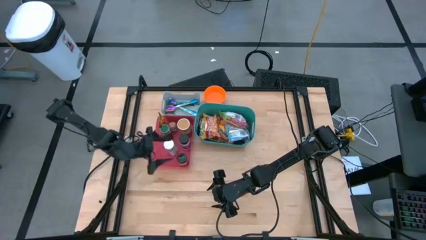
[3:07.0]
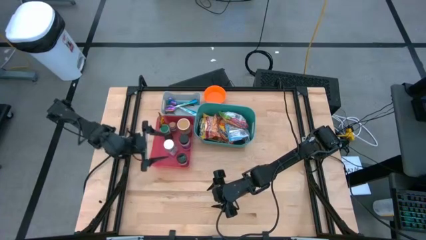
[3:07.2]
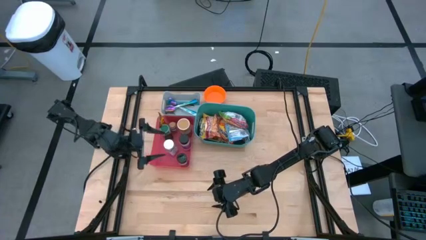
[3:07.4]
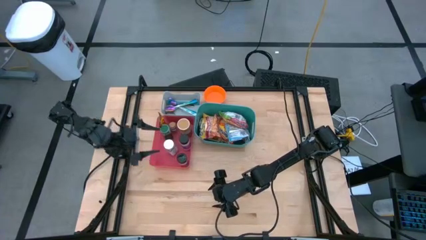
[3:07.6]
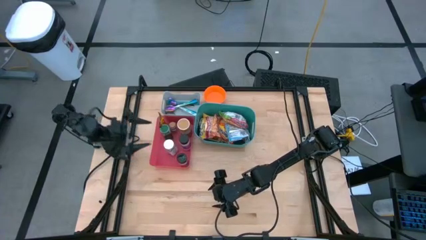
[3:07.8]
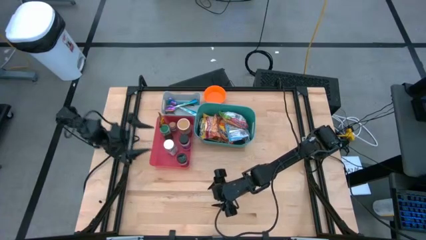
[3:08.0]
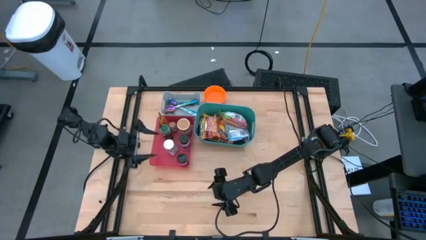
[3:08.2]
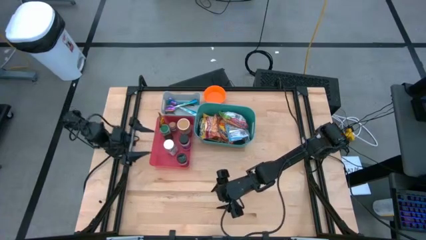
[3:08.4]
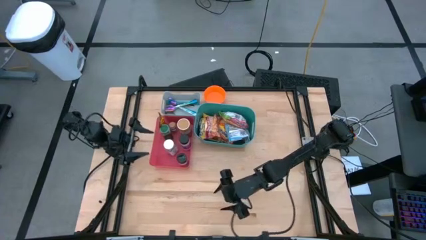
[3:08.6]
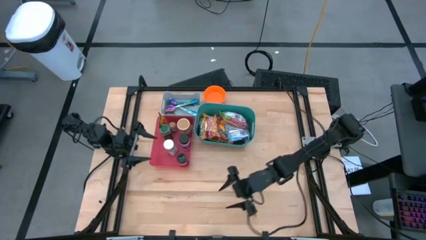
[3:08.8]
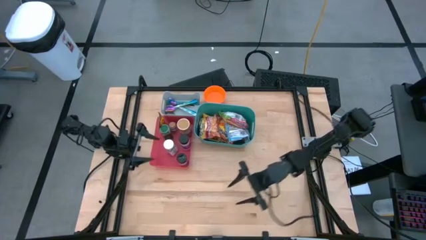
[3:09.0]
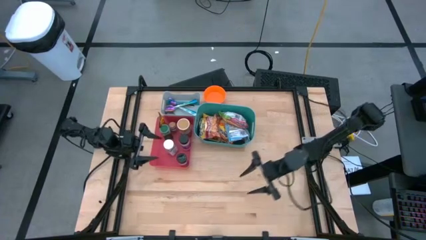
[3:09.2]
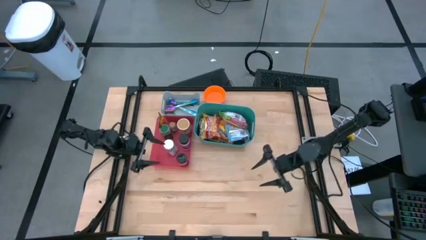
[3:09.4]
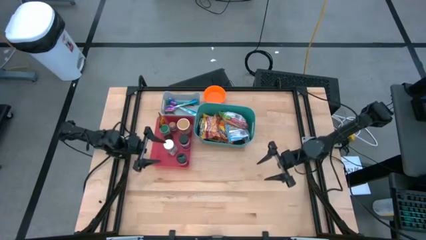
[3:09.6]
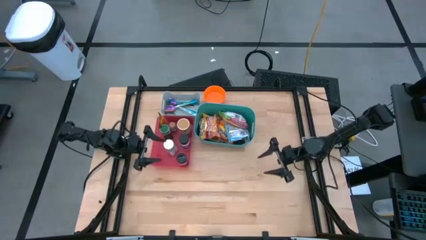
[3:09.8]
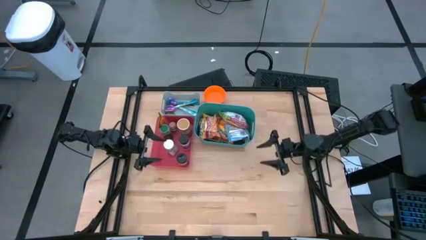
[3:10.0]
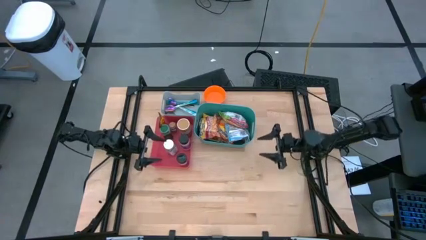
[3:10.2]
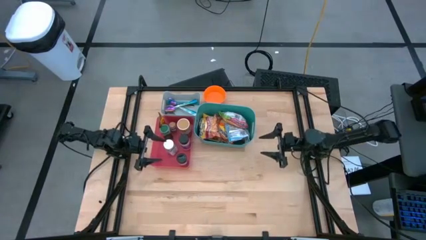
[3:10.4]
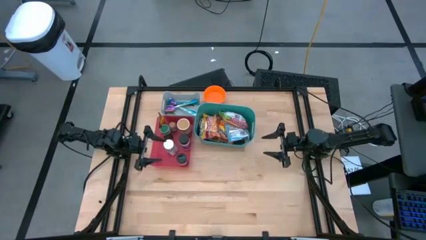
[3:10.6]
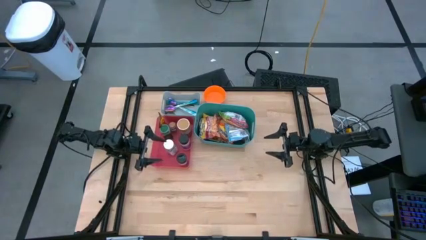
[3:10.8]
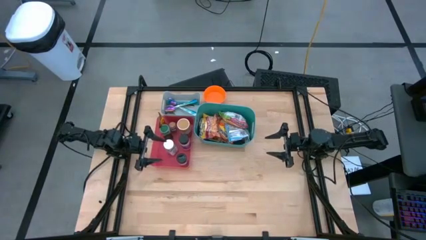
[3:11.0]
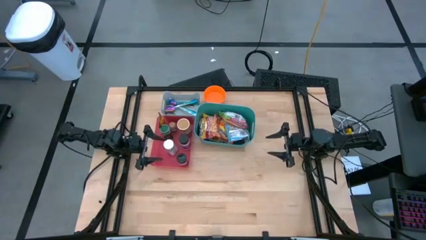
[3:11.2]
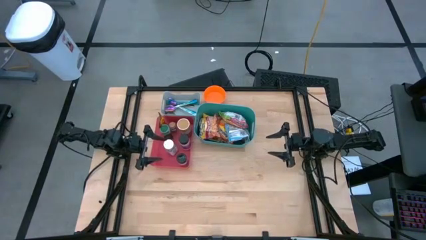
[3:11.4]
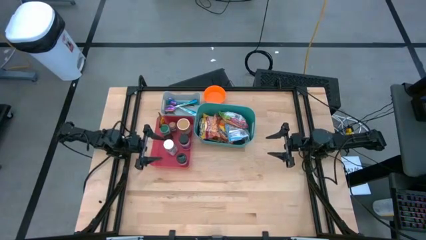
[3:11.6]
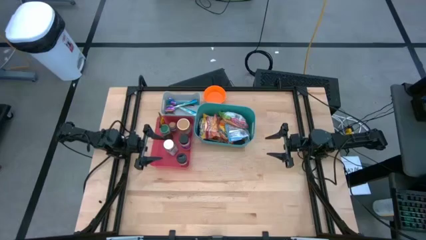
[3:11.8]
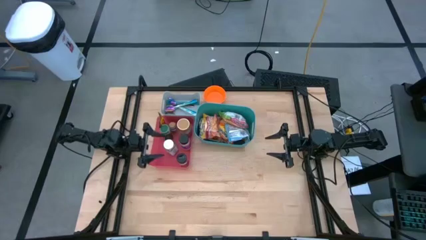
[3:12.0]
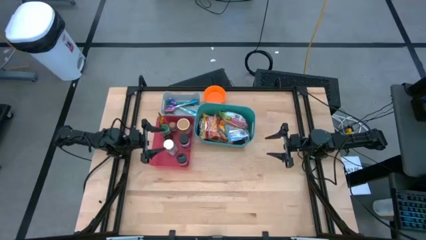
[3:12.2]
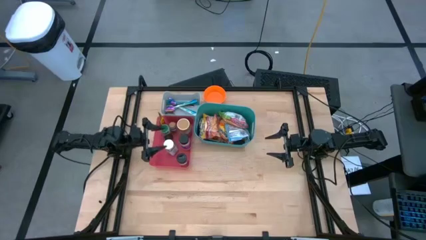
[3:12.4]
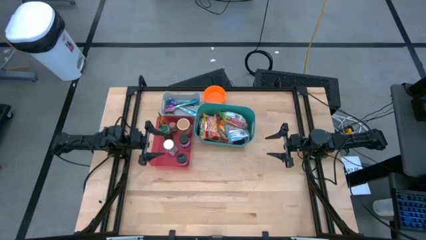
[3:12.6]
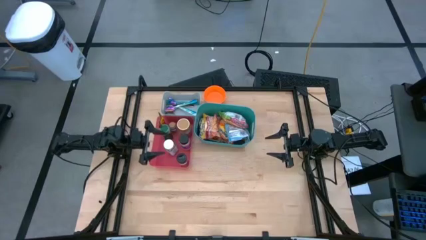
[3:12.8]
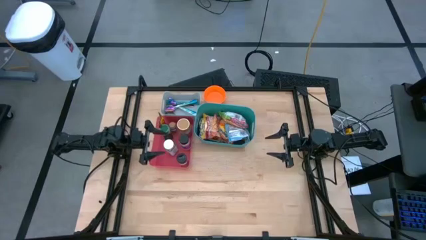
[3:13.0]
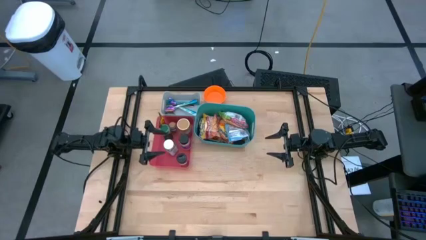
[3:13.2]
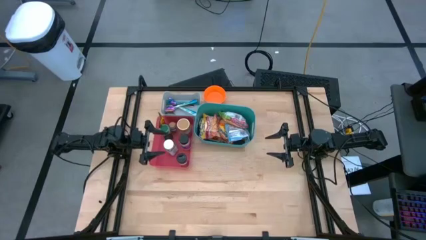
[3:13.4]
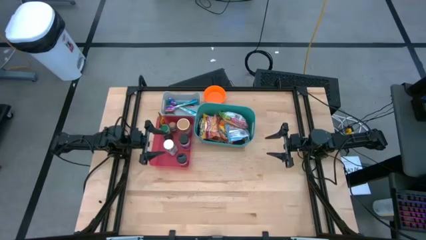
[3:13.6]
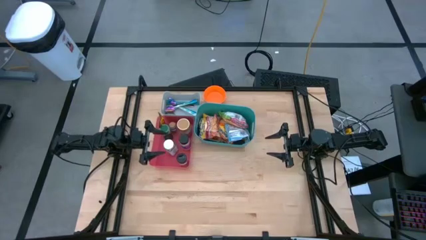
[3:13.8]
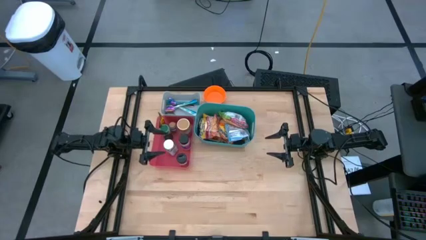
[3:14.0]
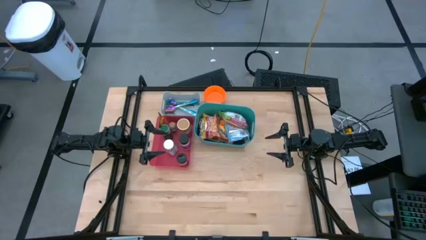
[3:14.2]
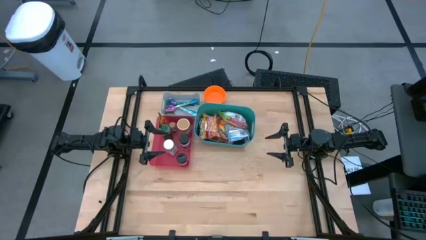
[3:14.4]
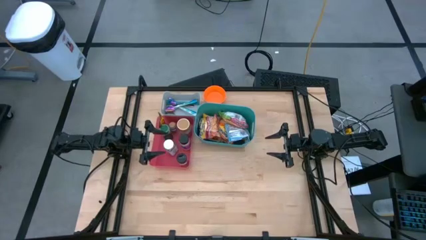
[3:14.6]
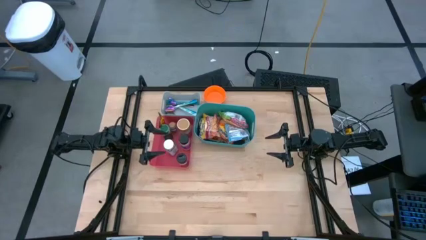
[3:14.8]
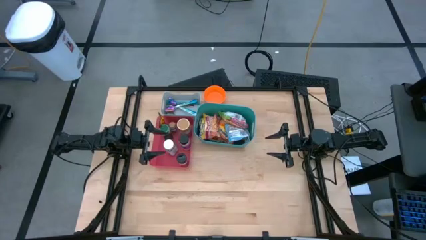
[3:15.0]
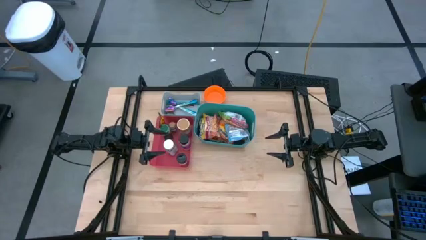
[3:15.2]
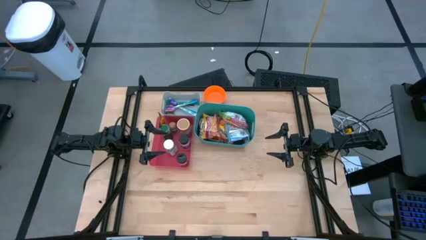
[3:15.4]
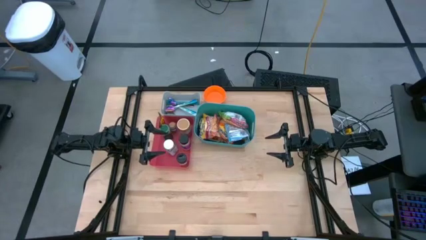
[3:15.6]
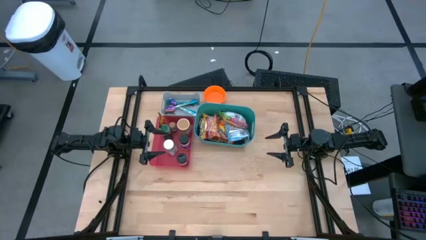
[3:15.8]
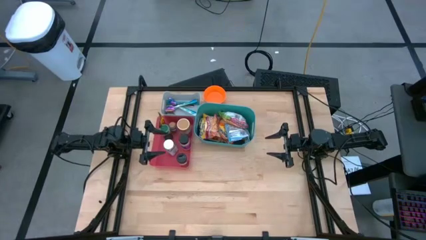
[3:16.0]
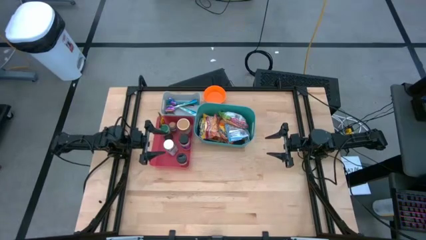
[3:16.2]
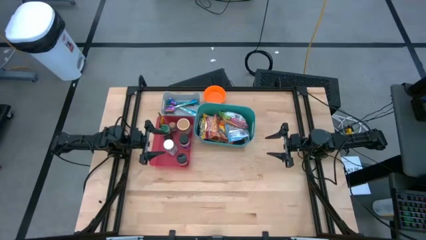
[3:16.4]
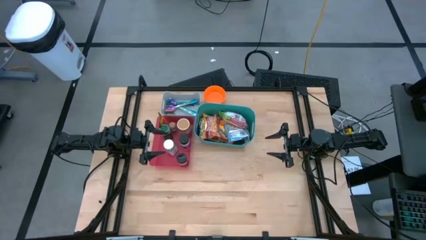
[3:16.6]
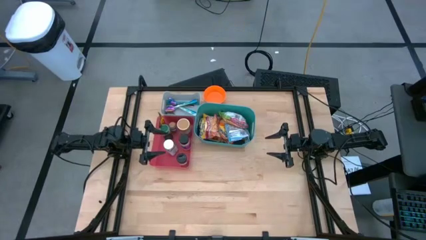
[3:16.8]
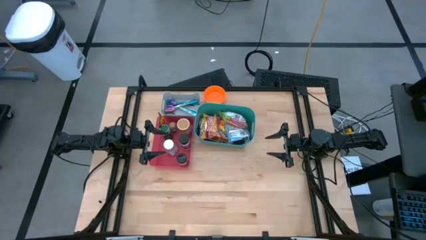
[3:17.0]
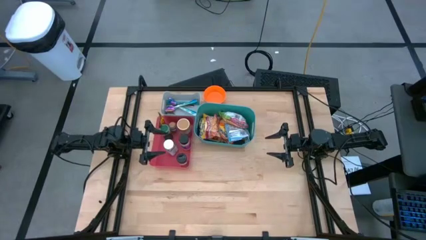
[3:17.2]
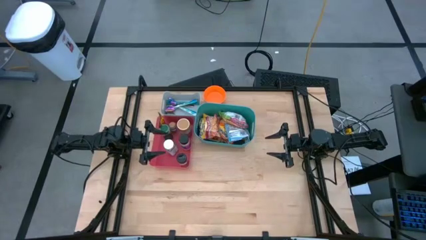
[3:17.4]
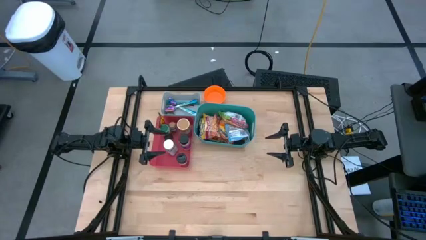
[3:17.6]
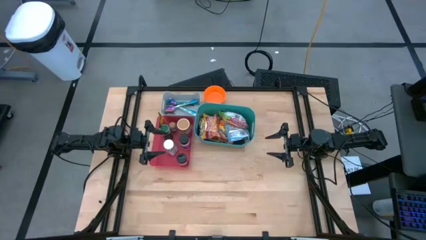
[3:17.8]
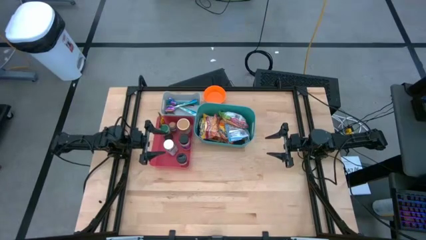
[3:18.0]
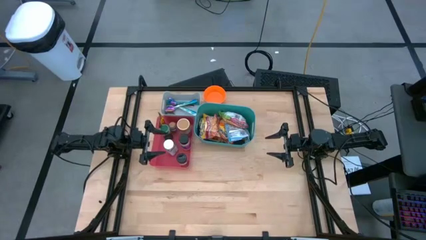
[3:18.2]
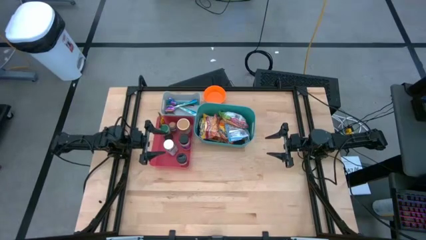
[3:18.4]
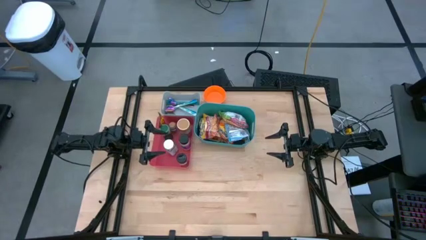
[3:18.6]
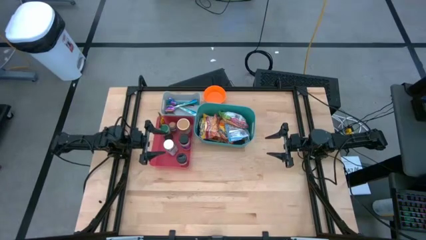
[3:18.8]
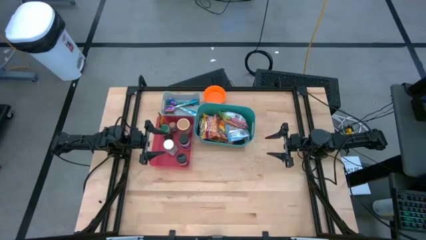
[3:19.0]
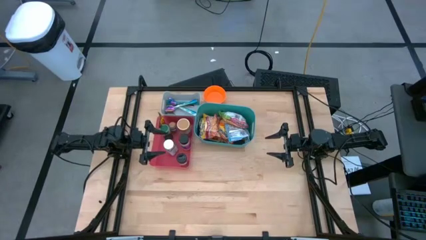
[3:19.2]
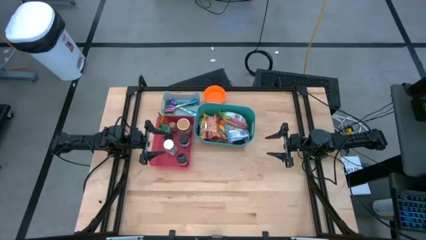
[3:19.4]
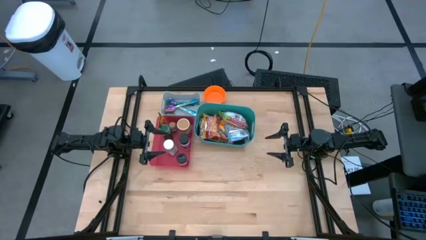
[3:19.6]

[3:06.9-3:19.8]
Task: Pick & Place Food Item
Return to Home Position

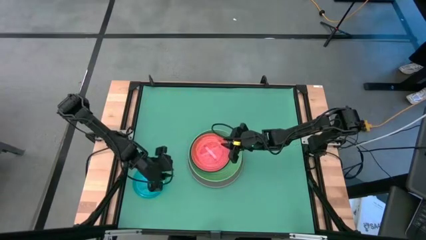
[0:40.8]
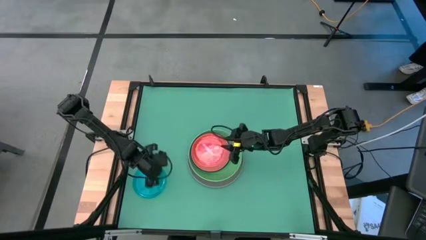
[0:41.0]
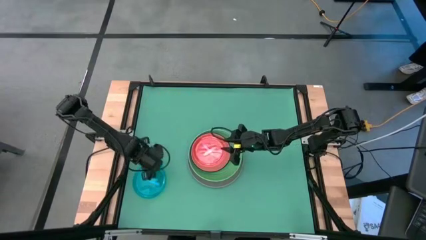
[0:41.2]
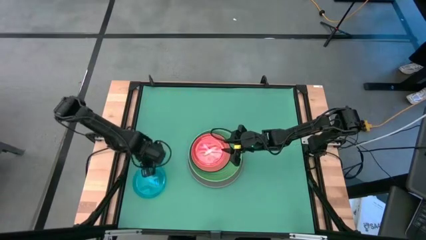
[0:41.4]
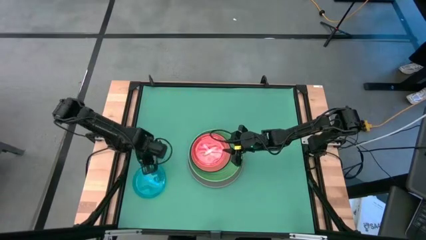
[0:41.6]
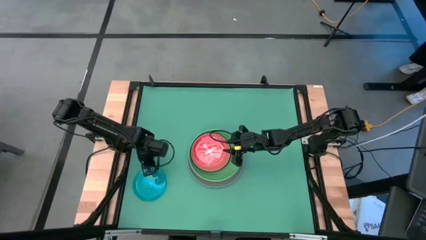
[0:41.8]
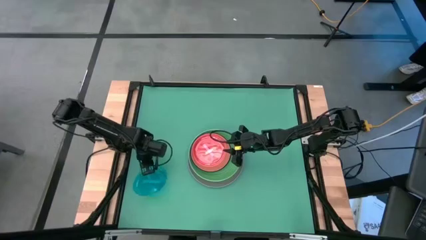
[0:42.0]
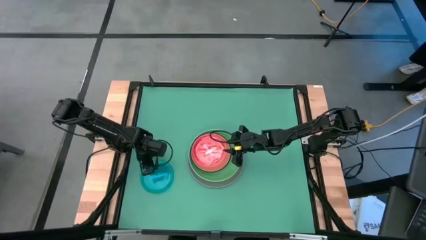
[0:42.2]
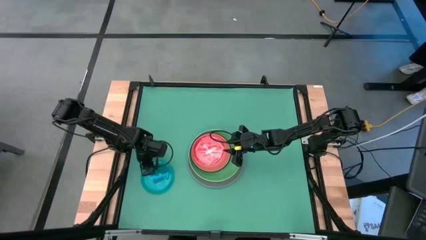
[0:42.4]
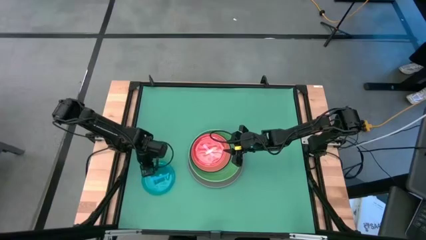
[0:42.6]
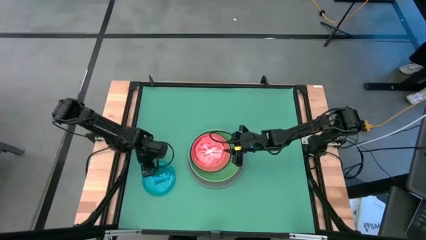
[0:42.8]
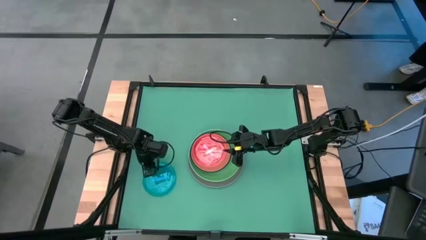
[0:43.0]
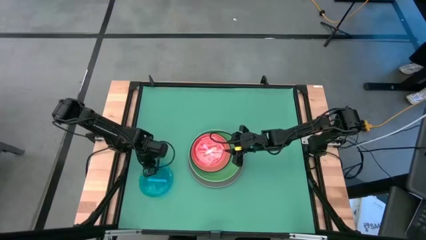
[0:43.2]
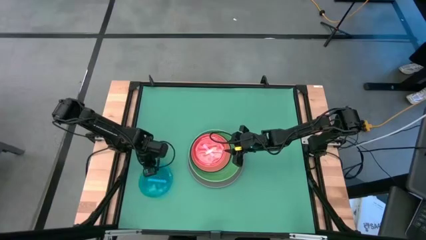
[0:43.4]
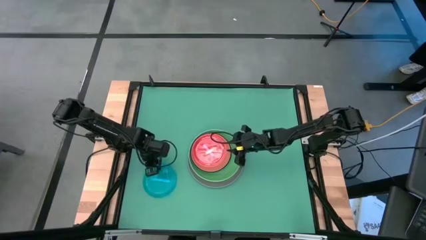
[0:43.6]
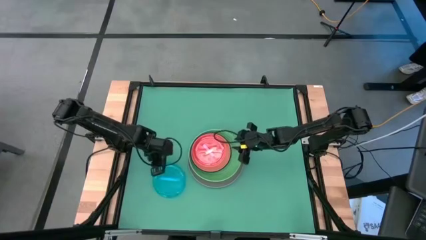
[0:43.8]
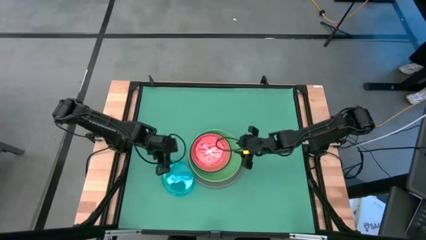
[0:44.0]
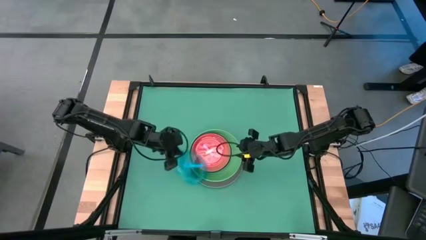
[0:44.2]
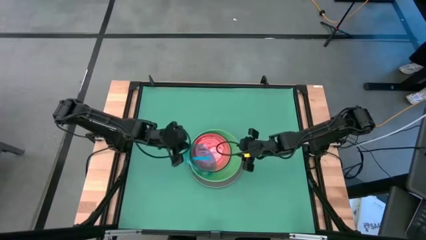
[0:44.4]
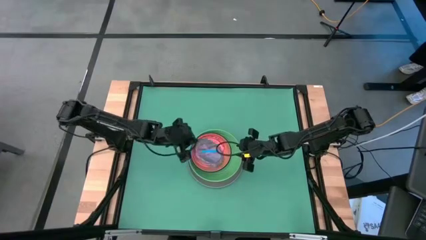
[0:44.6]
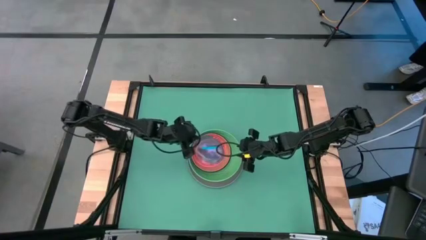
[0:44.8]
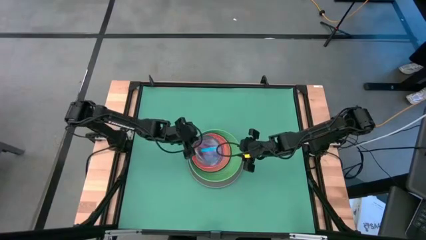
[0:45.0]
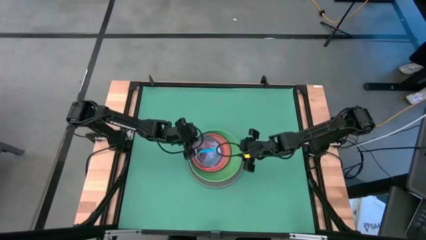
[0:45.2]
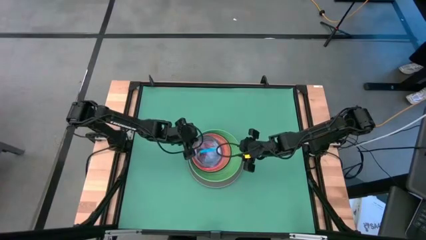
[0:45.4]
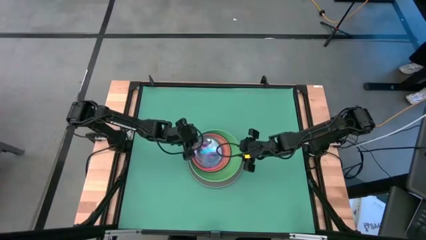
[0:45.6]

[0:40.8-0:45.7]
Task: Stack plastic plates
Stack the blue plate on the pink plate
